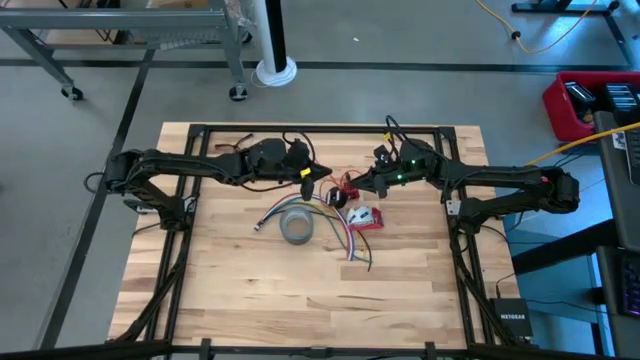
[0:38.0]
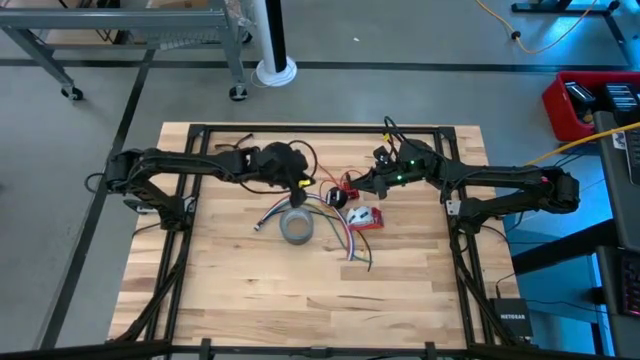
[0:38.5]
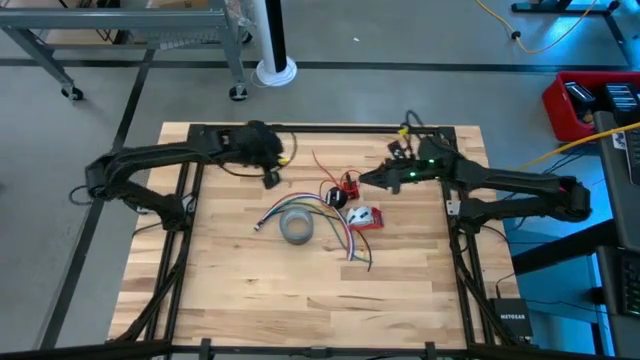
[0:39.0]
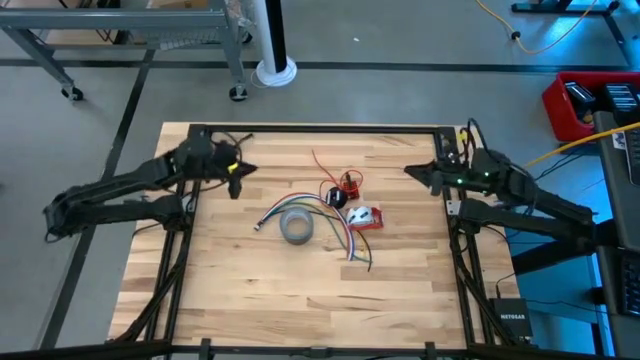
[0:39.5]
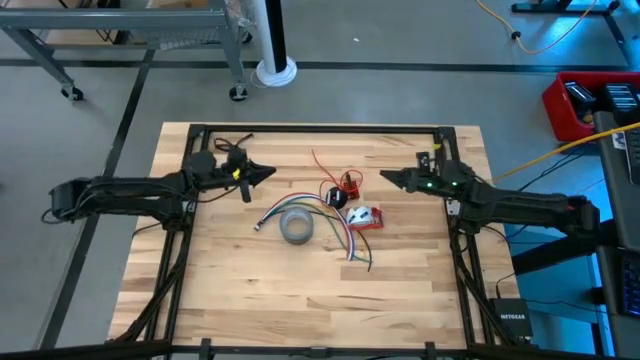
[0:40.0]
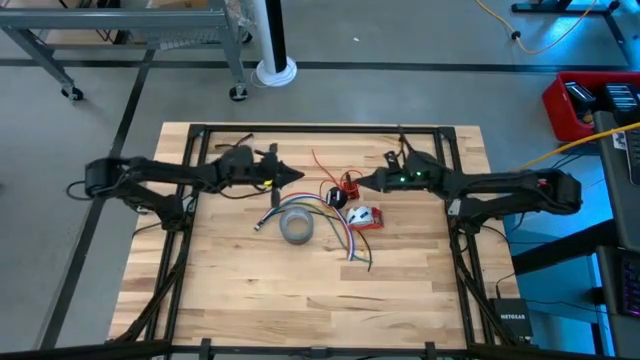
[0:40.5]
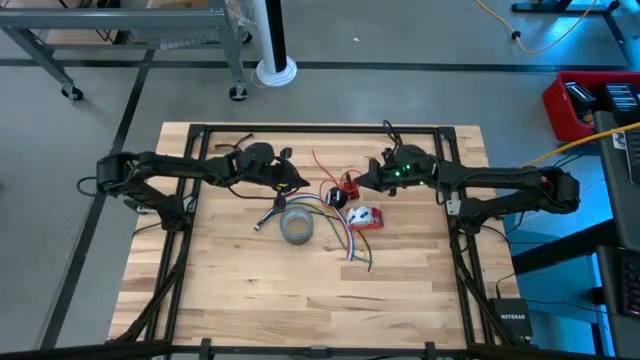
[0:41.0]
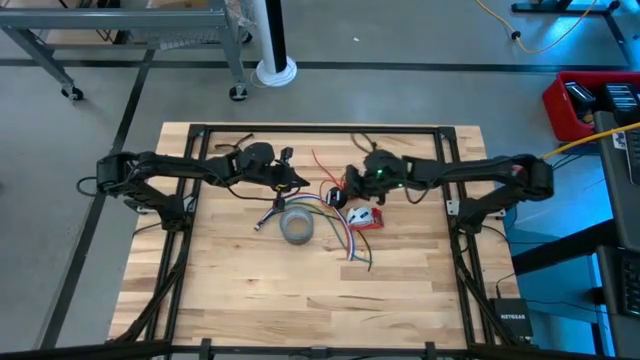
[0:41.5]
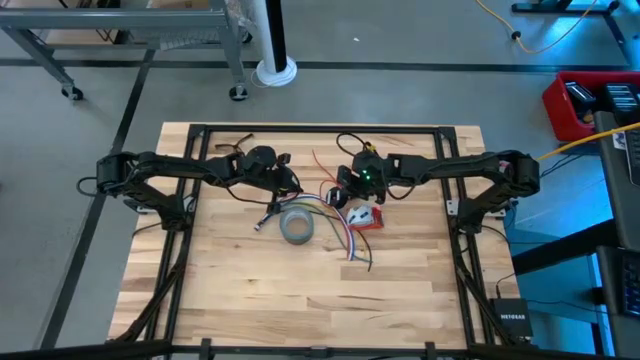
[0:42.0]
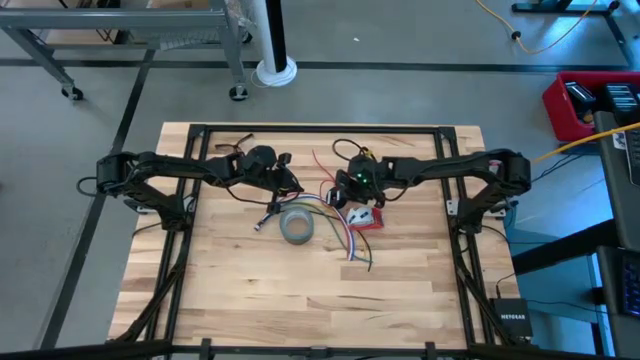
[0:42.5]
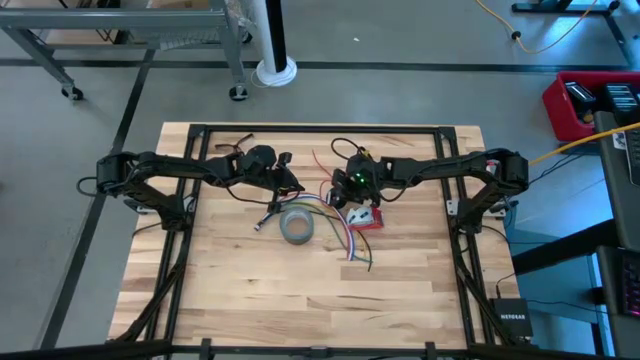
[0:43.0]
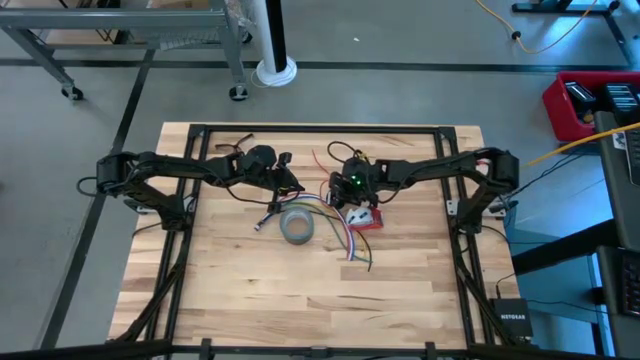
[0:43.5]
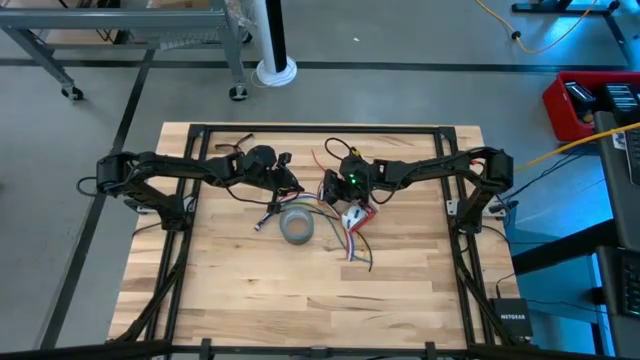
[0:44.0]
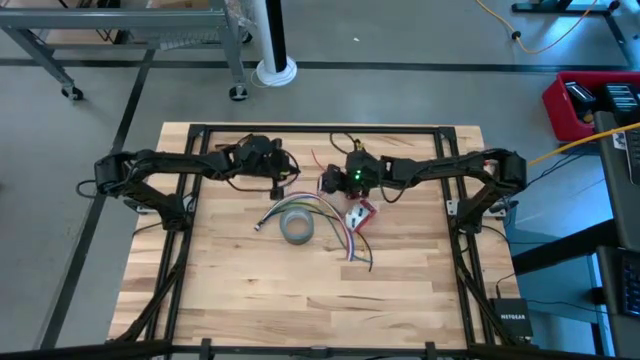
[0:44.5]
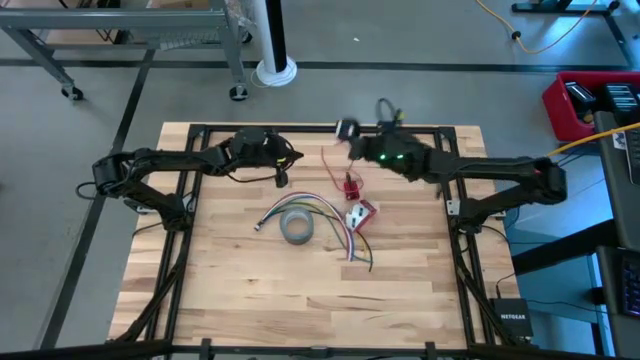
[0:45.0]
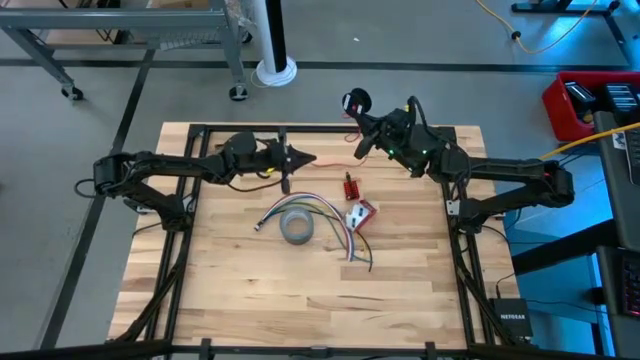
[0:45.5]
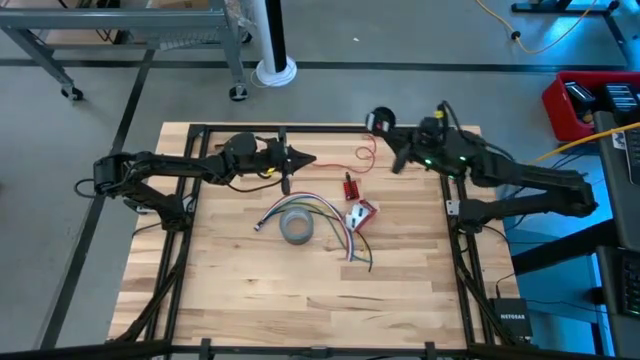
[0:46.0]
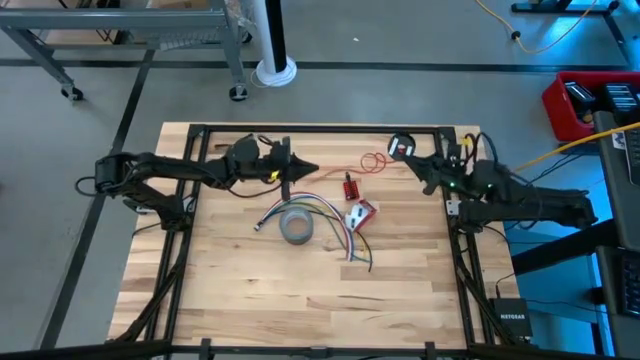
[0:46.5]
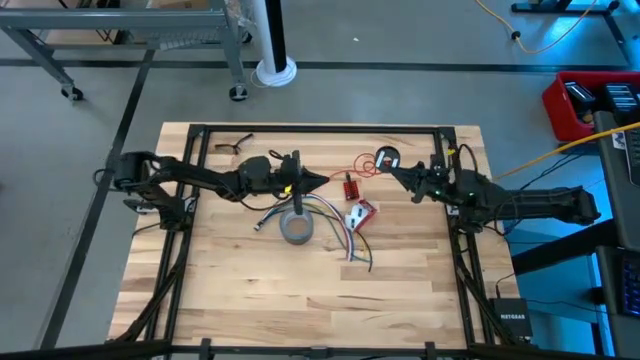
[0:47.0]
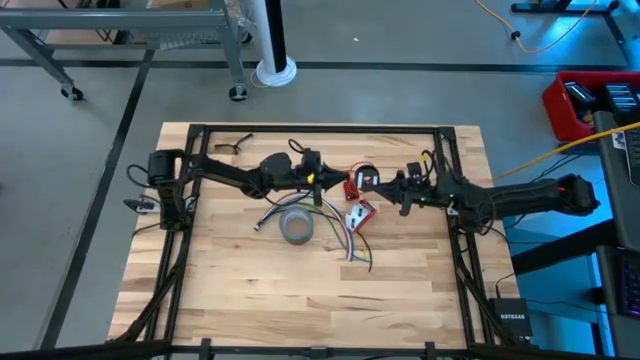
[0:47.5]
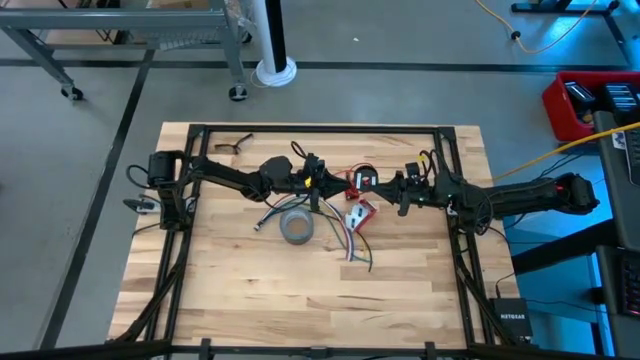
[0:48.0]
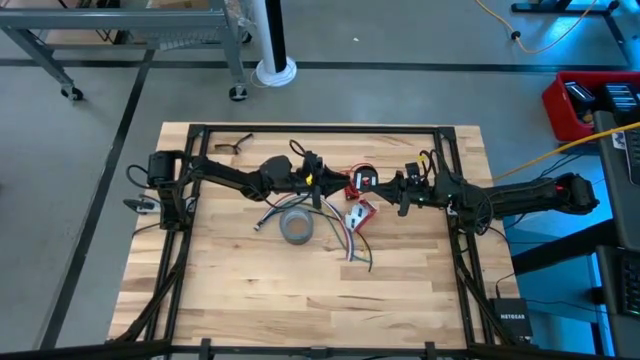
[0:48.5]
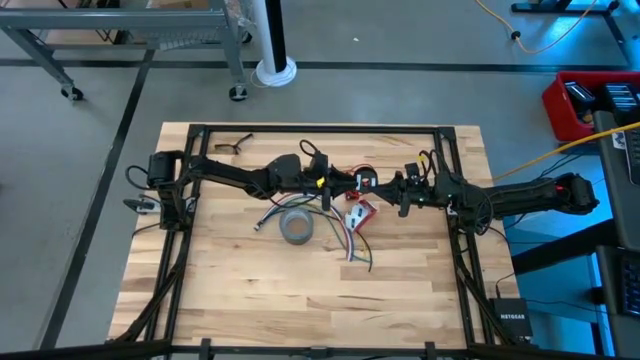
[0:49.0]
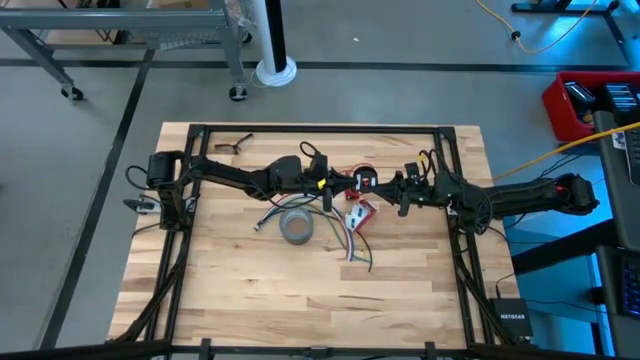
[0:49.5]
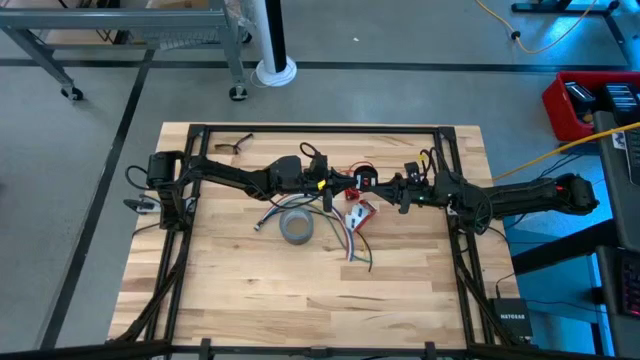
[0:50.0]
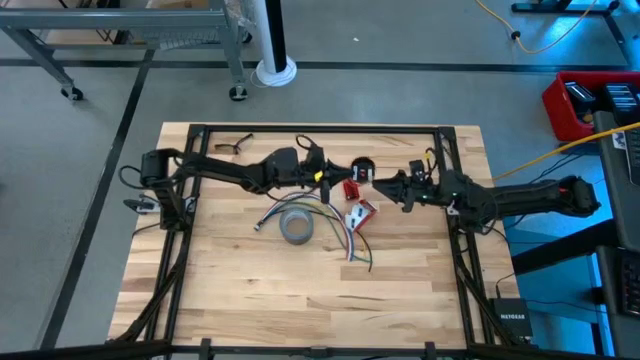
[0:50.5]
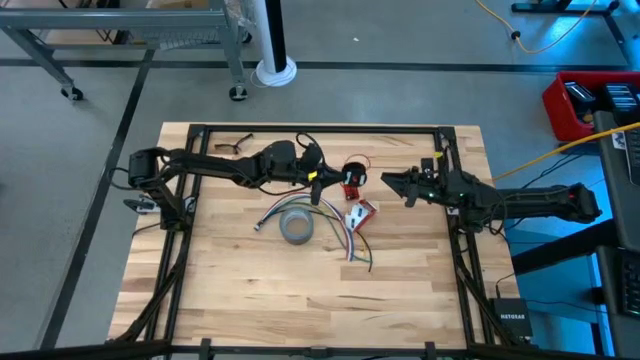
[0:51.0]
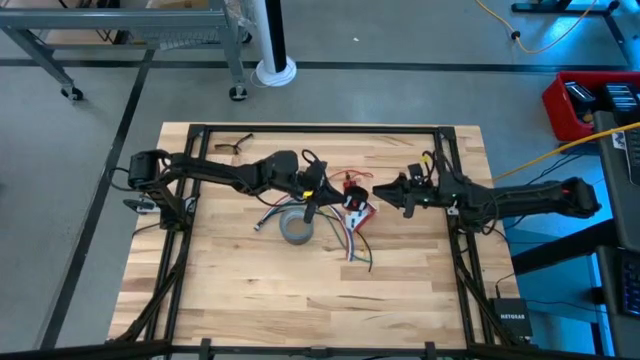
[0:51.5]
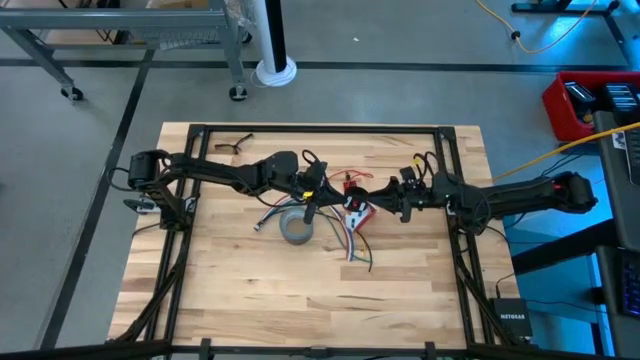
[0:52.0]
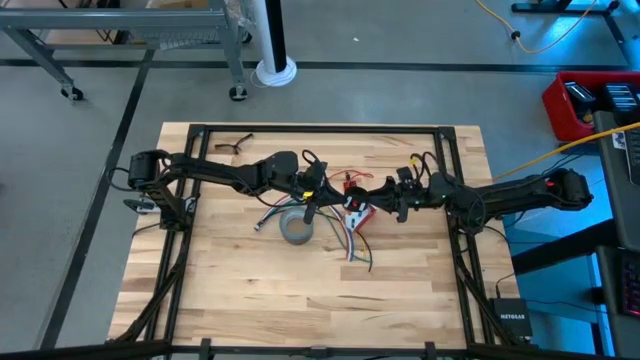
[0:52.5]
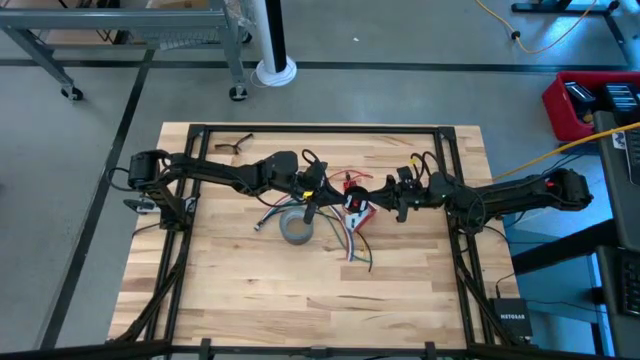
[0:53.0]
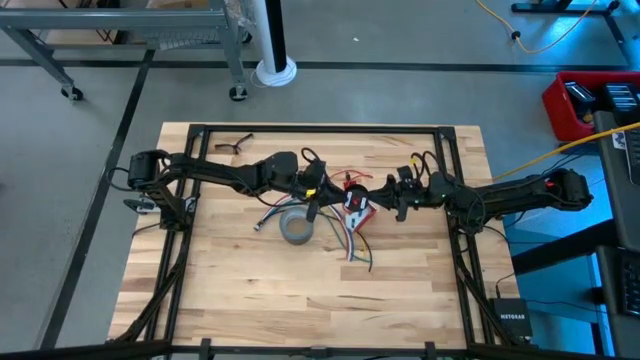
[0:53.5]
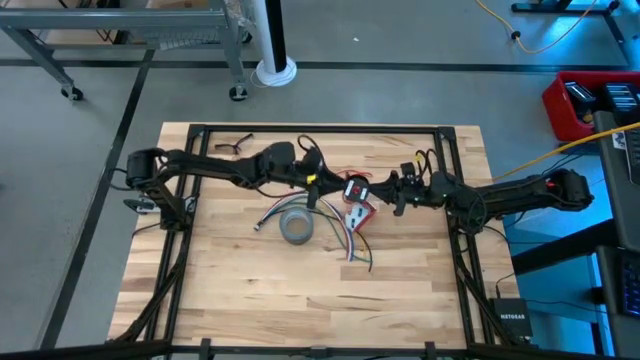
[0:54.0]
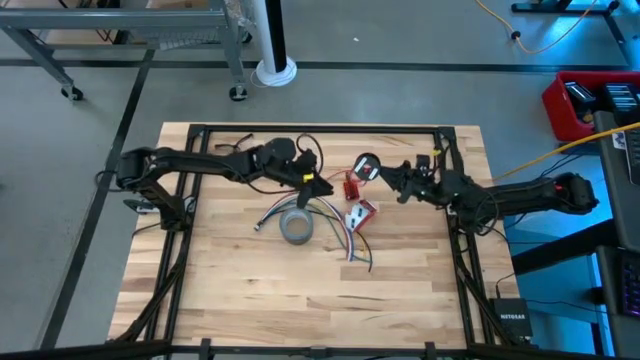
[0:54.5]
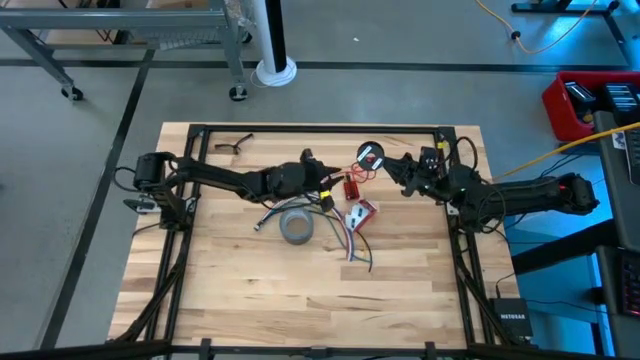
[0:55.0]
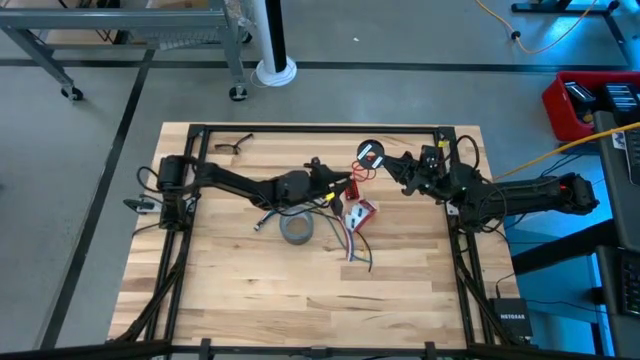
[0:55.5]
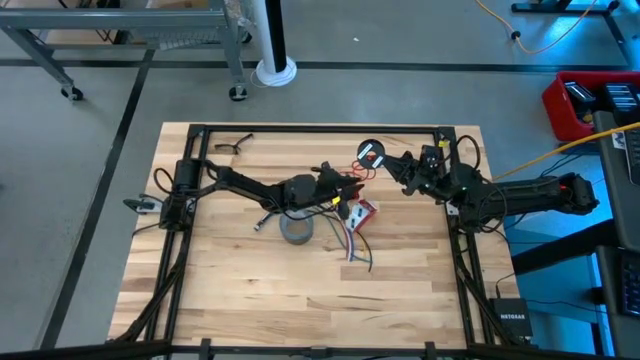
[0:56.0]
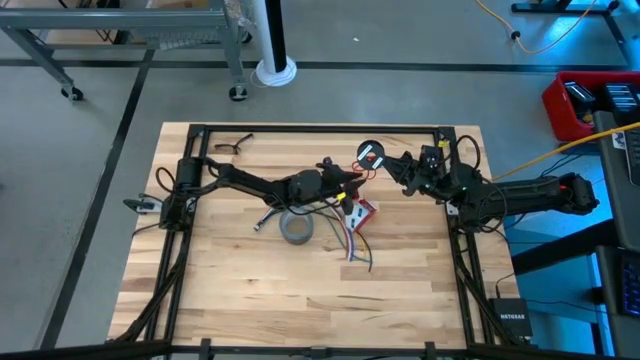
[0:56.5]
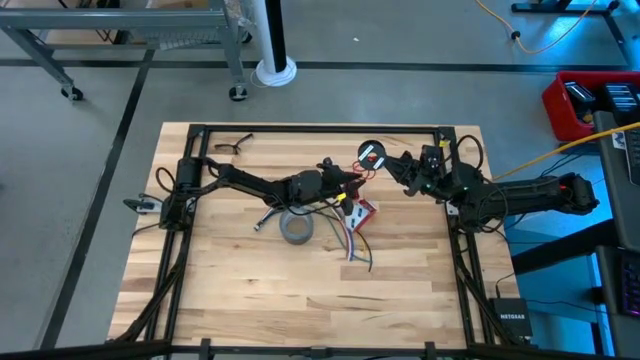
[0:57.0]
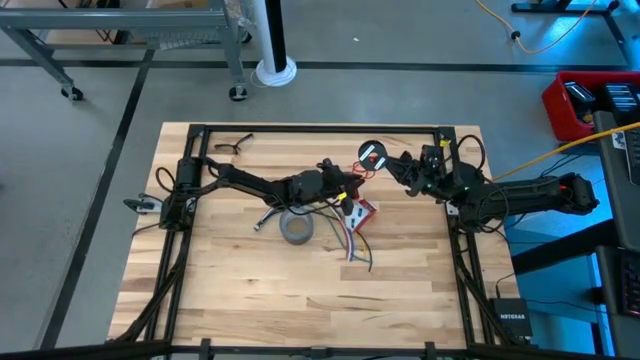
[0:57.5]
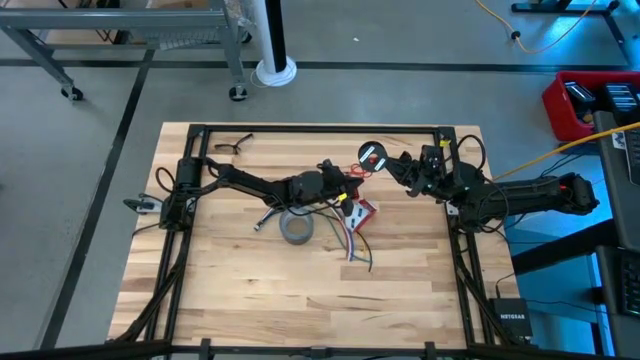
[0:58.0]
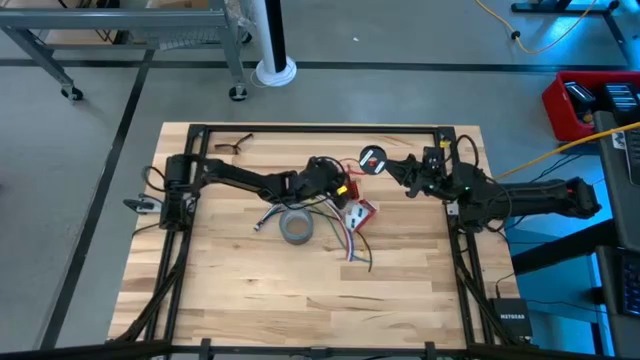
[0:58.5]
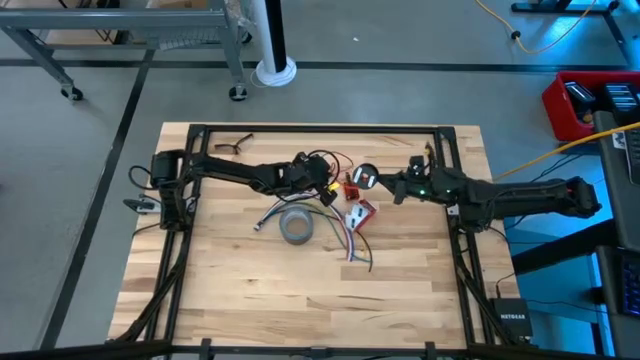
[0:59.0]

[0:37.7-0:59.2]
Task: Coil cords
Coil the red wire on the black spool

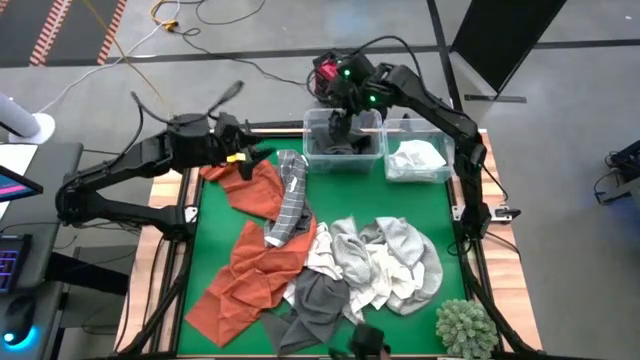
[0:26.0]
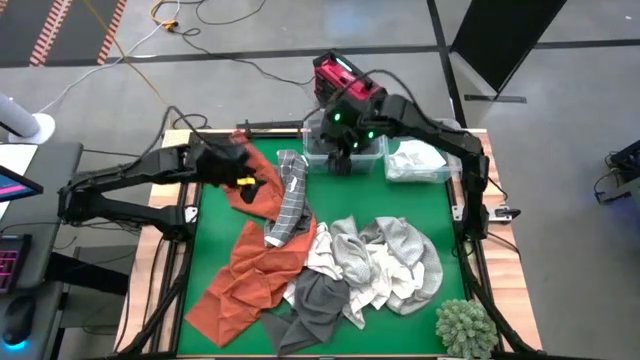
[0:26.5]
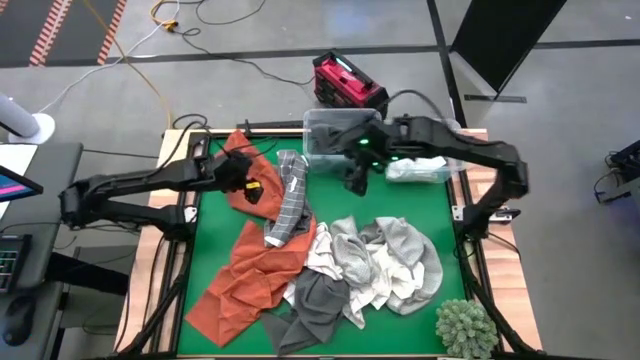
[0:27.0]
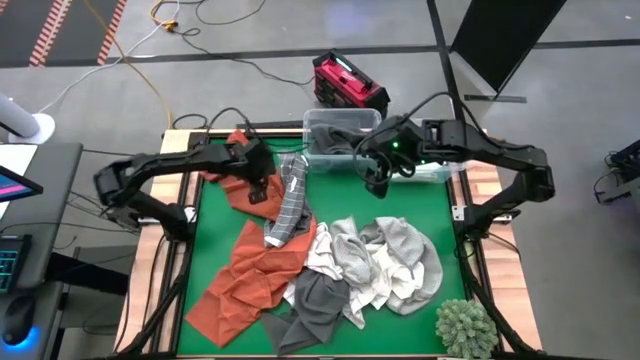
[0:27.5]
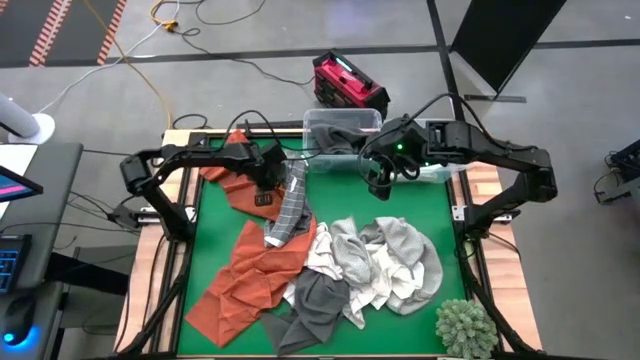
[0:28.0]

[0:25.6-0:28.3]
Task: Sort towels by color in basket
Put the orange towel into the left transparent bin
